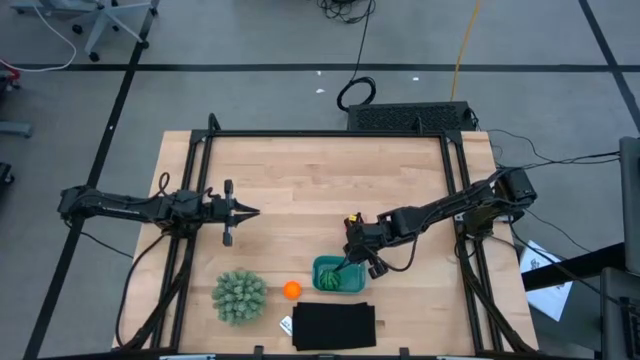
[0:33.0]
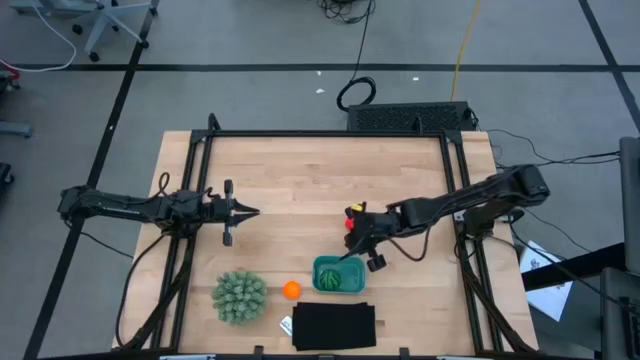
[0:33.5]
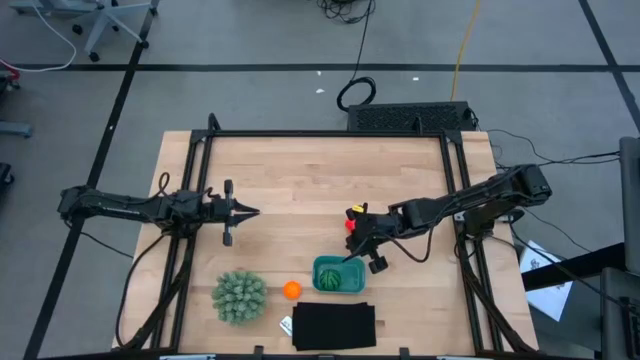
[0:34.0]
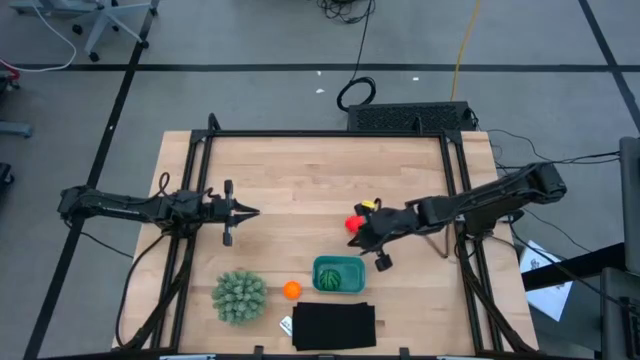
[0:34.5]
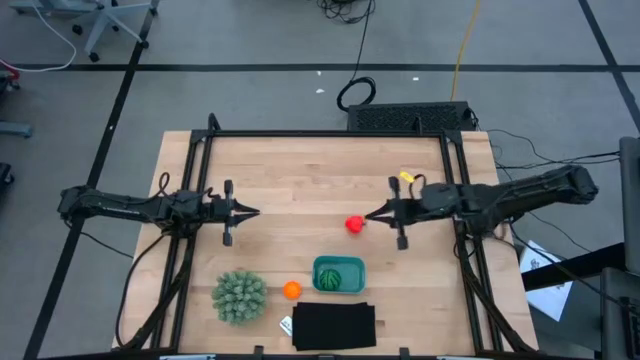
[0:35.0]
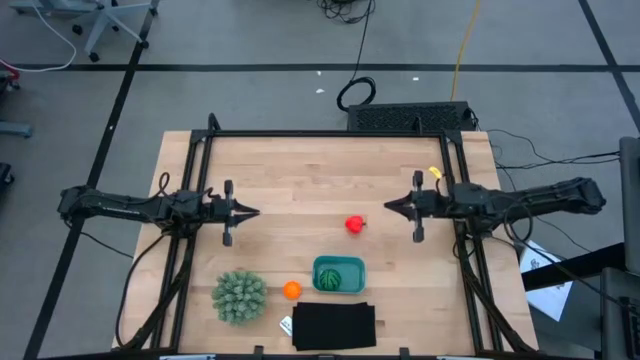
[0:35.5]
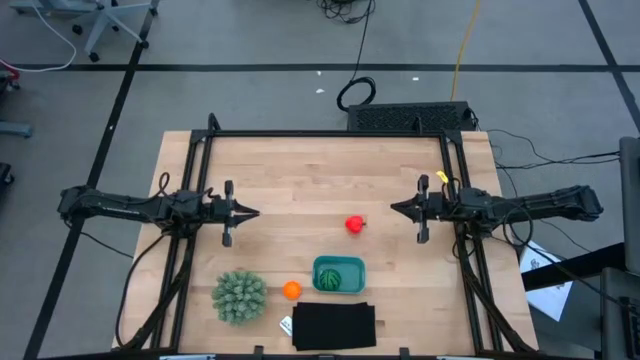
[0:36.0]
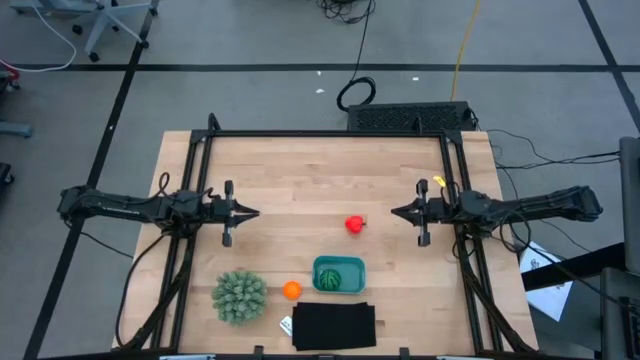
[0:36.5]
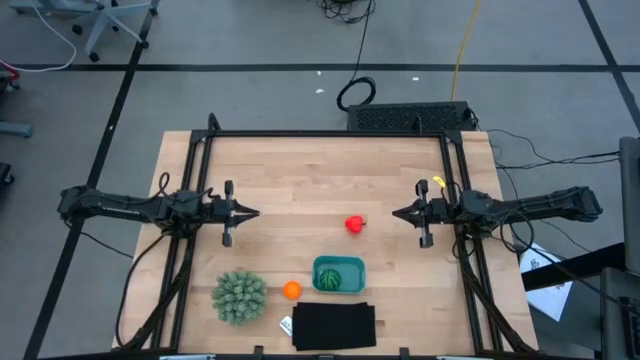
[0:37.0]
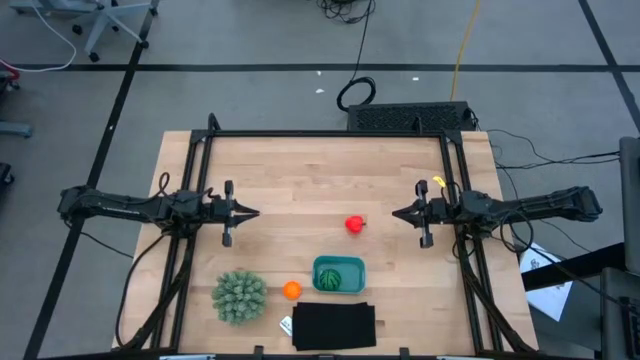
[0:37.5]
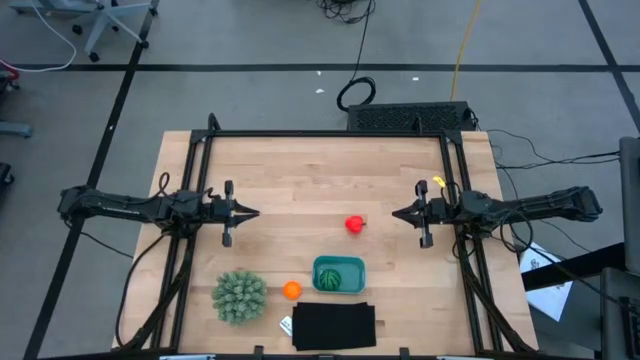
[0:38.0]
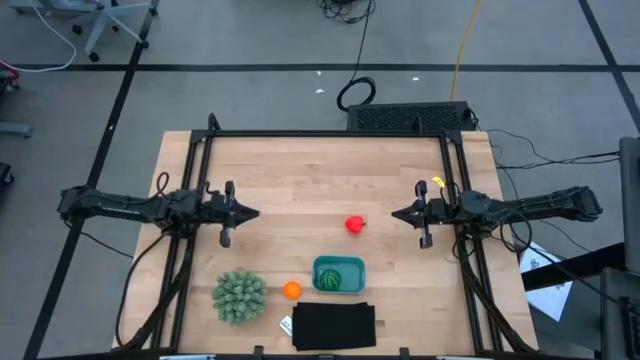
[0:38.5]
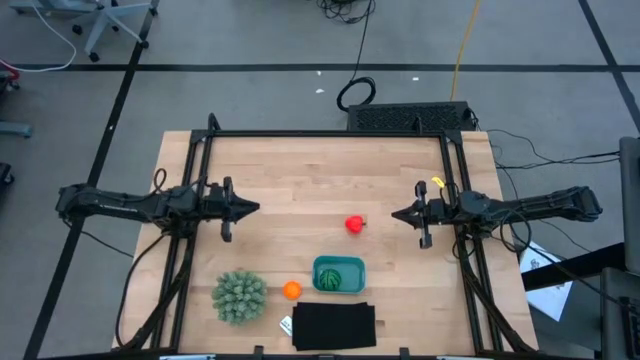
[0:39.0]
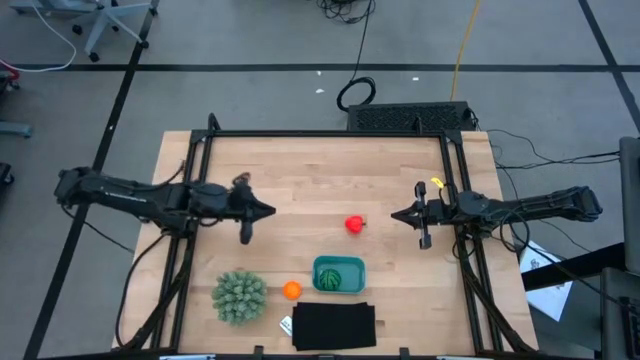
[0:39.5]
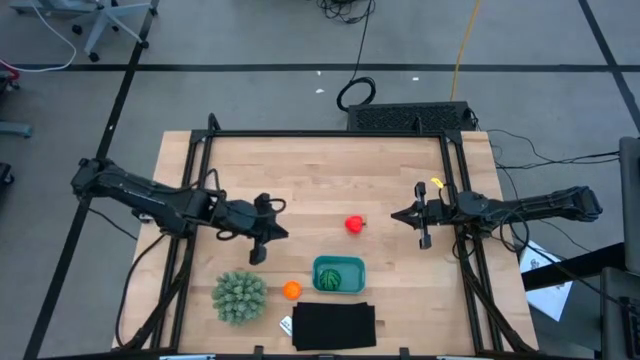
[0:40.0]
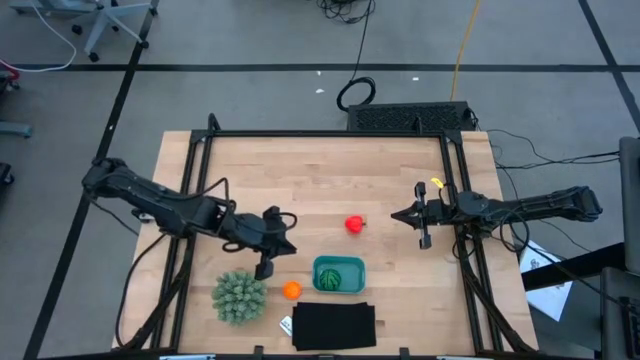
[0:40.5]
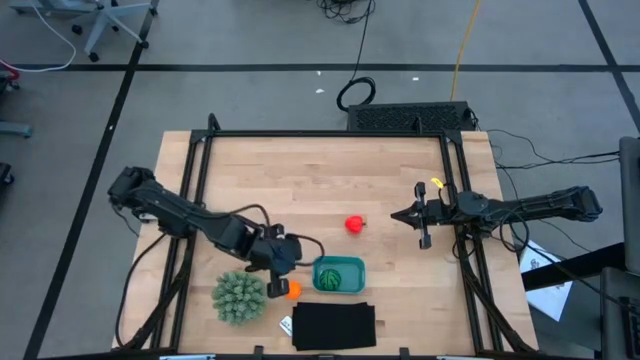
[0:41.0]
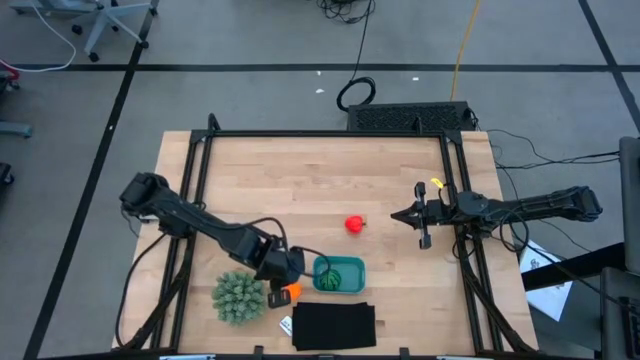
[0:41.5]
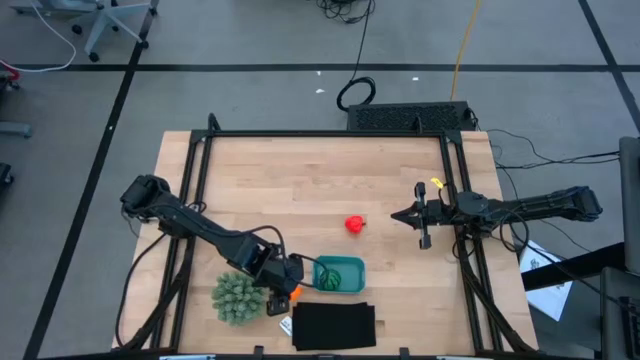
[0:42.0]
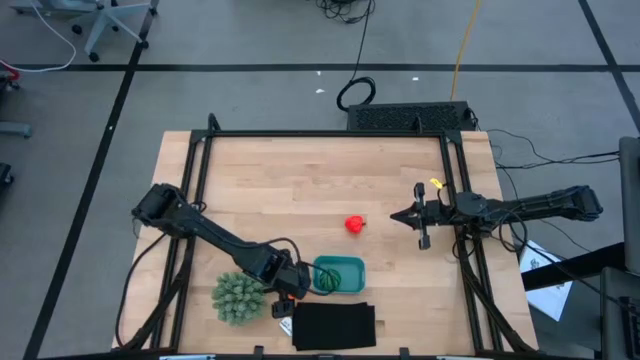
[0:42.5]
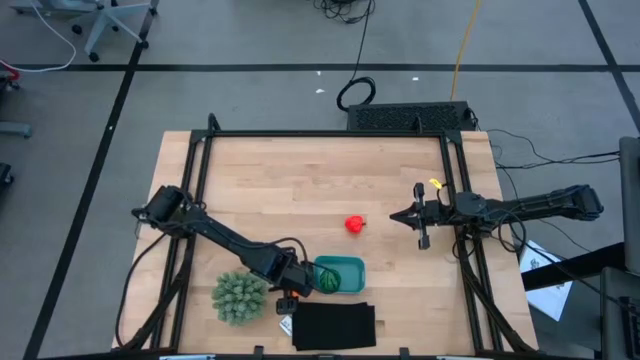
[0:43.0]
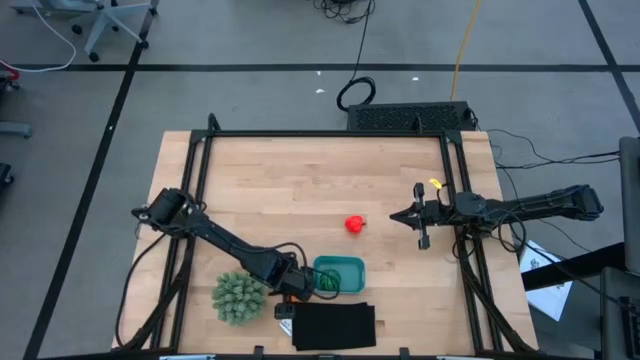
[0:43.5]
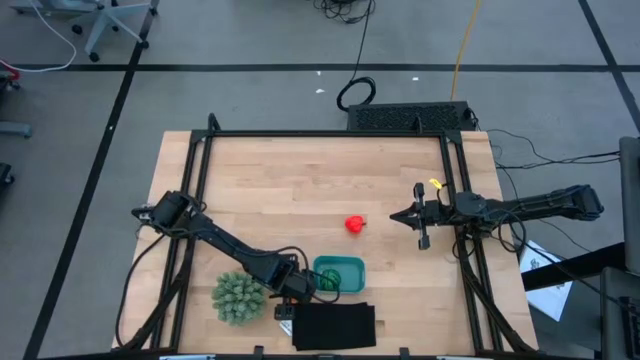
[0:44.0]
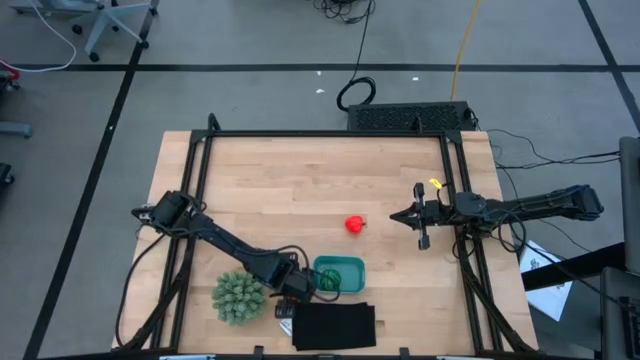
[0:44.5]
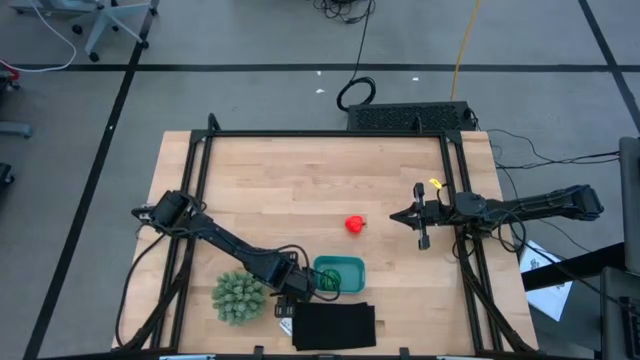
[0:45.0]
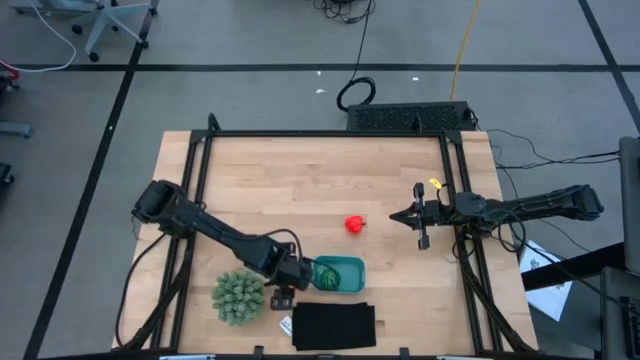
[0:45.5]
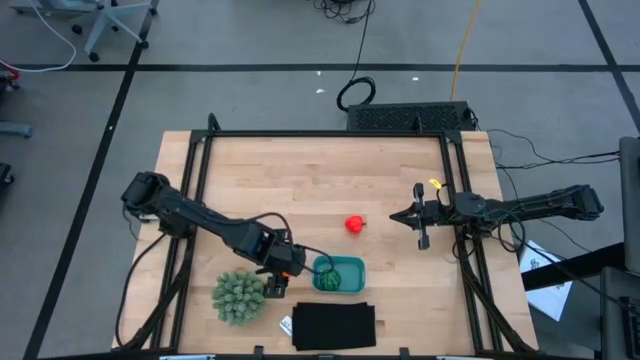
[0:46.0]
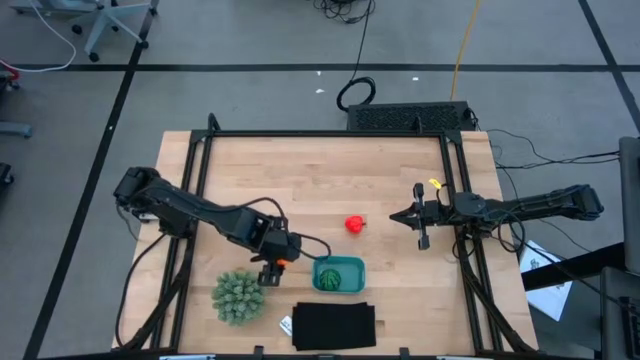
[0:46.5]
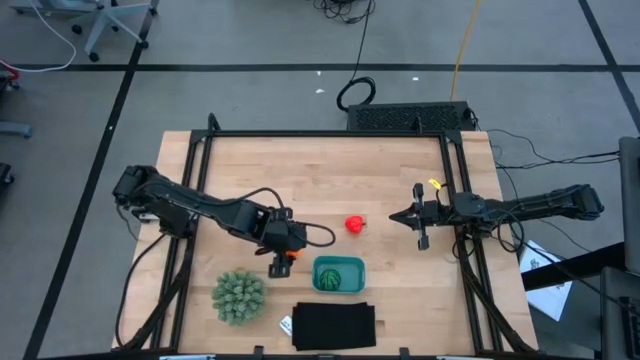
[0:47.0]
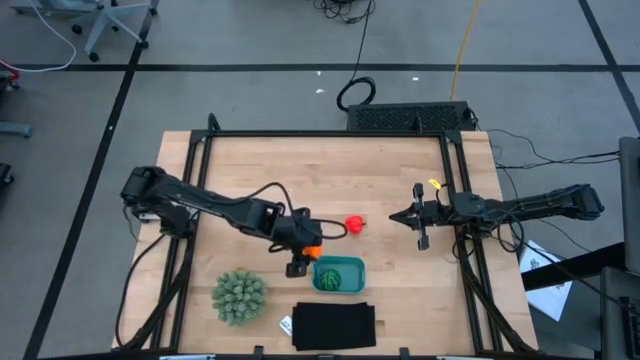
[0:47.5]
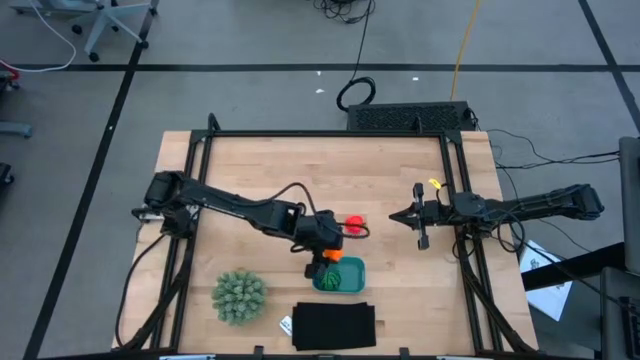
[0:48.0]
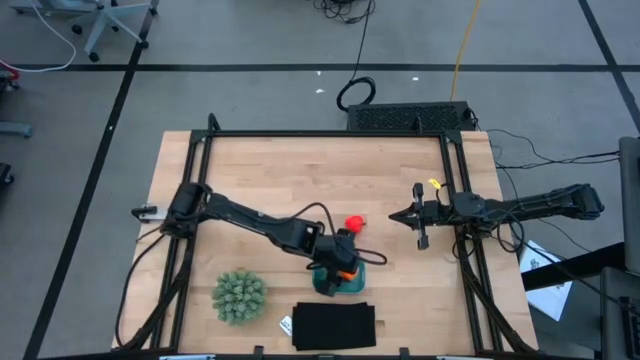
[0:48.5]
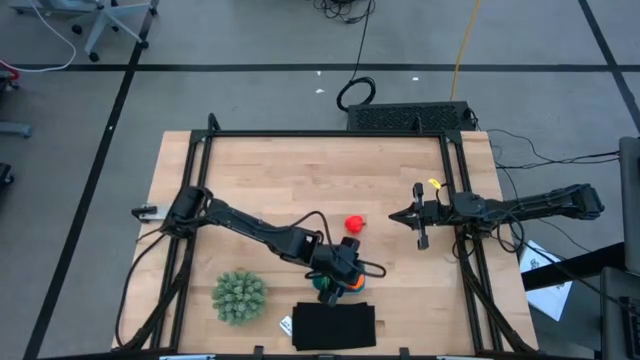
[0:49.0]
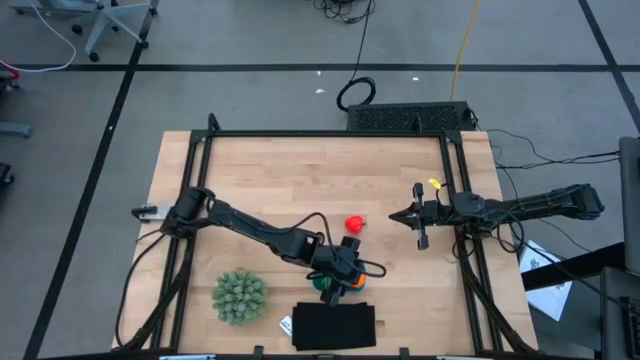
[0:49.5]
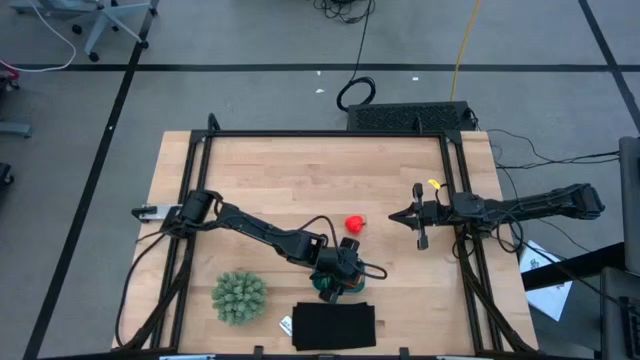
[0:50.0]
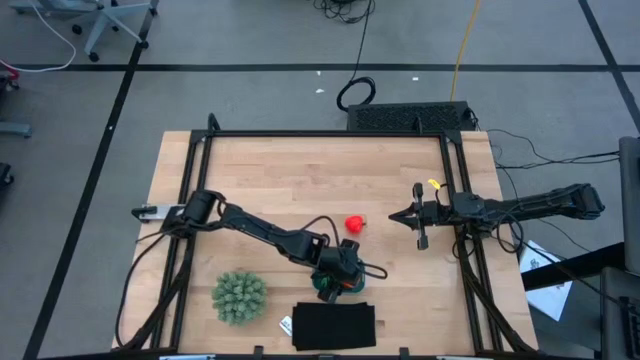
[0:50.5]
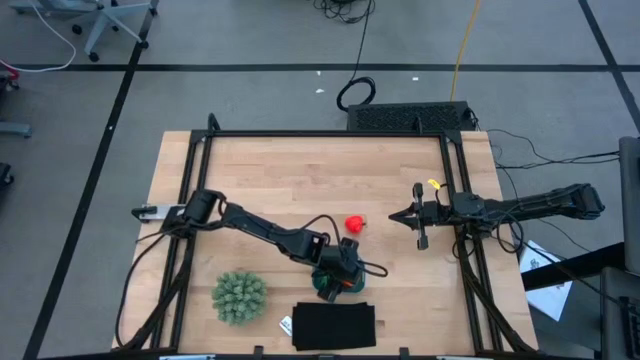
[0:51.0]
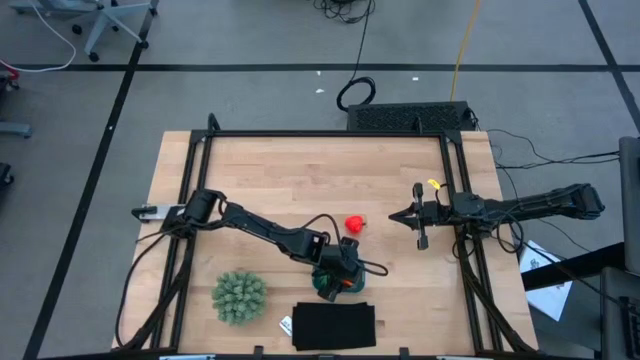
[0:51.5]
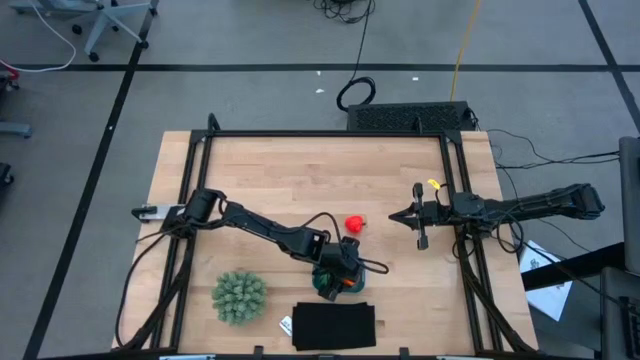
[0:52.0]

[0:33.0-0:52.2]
Task: Pick and placing Produce into tupperware
Put the orange pumpkin into the blue bin

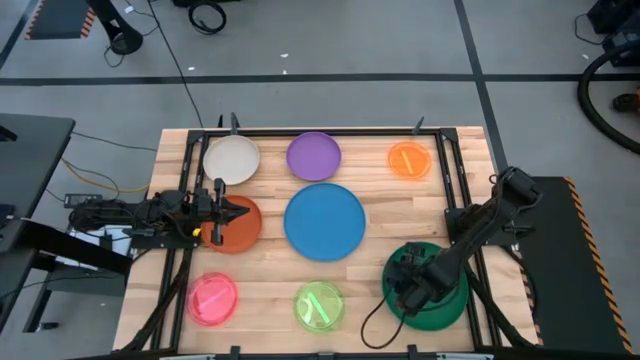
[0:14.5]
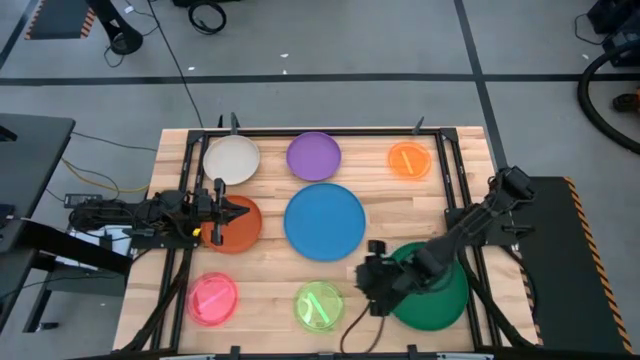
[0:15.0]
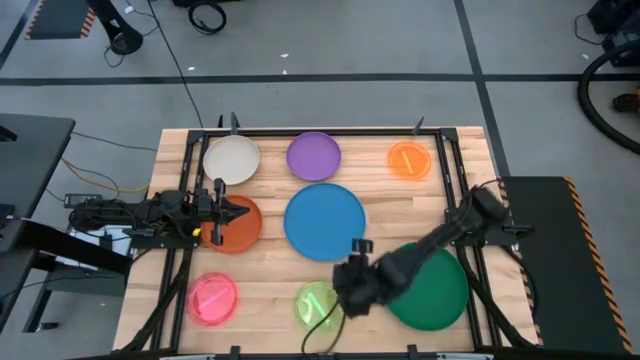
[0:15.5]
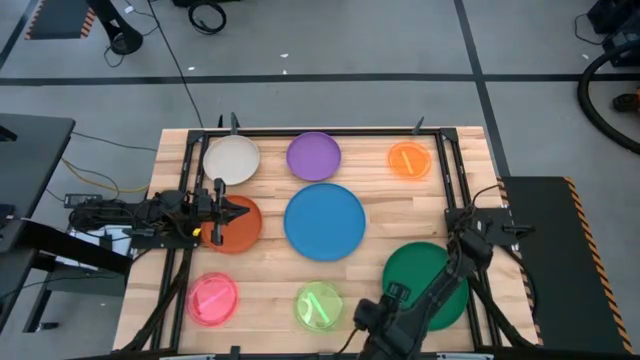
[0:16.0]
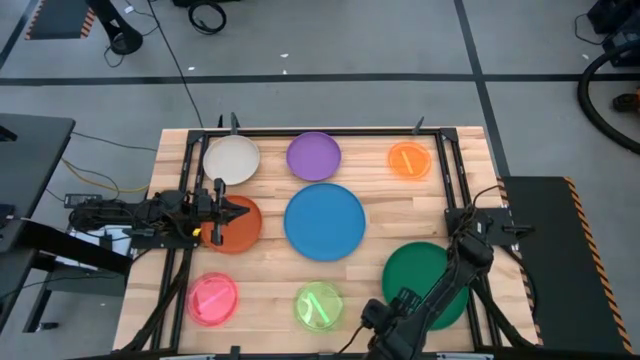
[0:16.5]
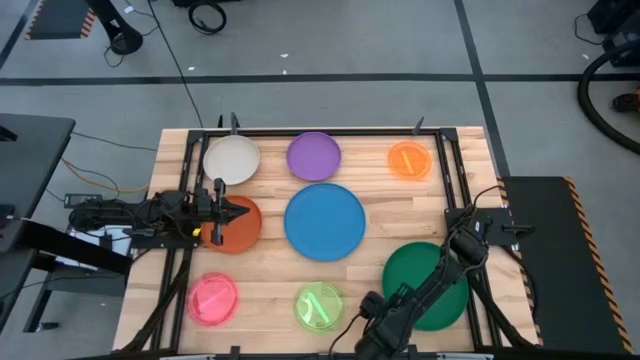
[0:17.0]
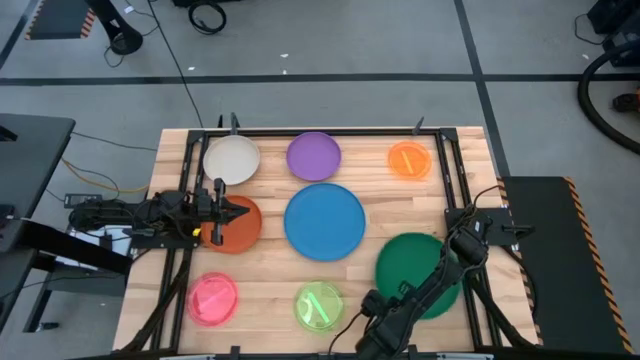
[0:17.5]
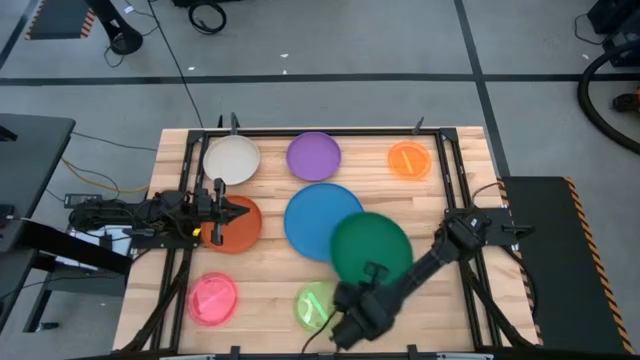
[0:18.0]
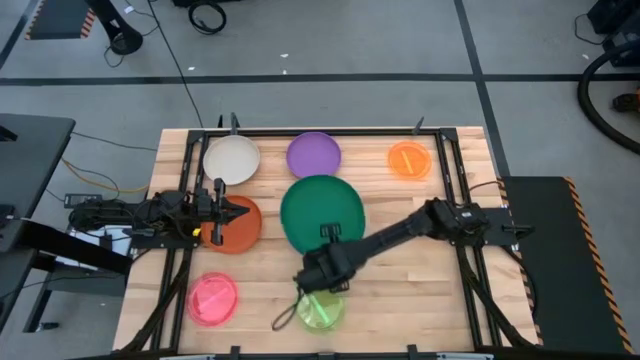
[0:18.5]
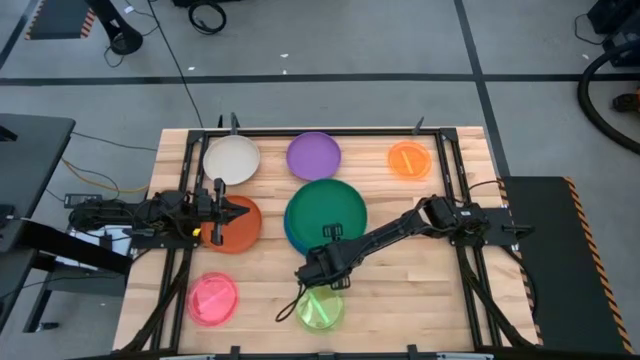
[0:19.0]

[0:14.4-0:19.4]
Task: Stack plastic plates
Stack the stacked plates on top of the blue plate
